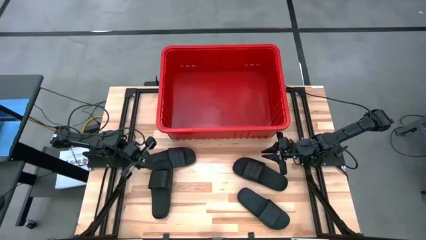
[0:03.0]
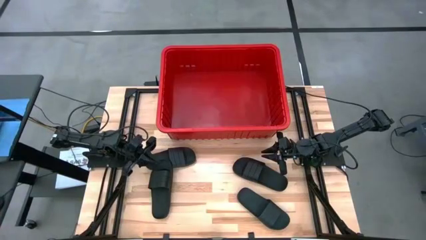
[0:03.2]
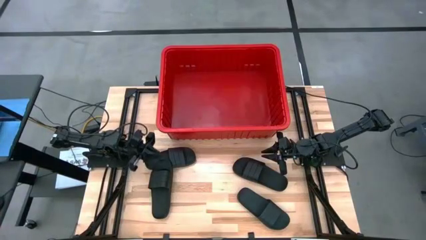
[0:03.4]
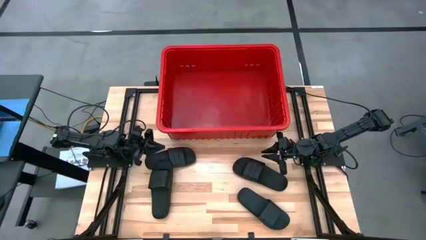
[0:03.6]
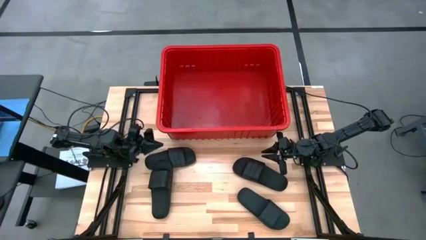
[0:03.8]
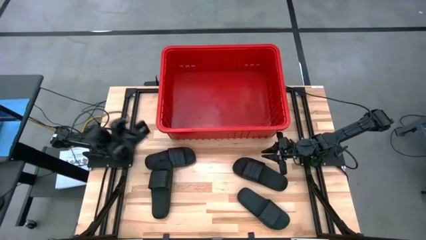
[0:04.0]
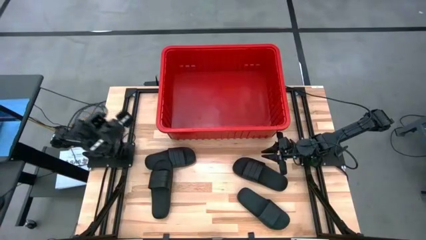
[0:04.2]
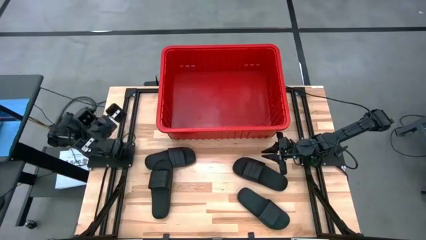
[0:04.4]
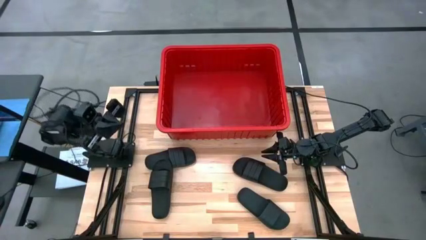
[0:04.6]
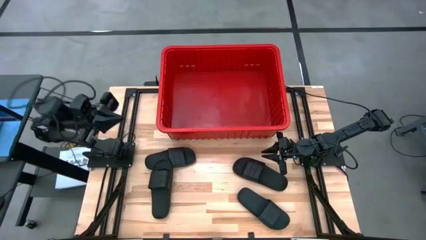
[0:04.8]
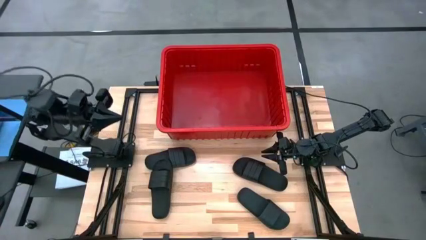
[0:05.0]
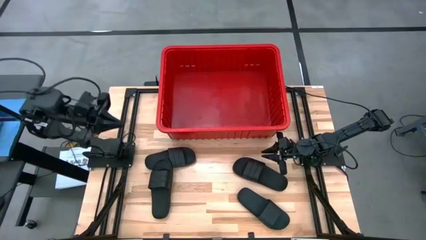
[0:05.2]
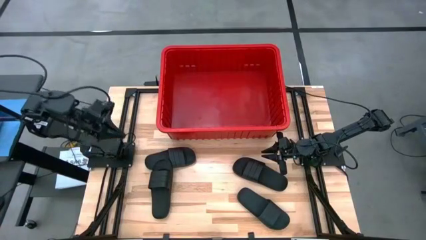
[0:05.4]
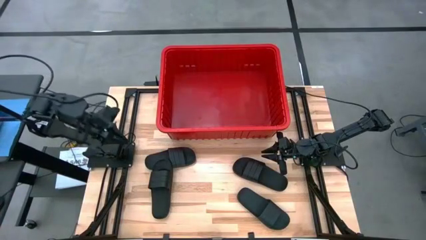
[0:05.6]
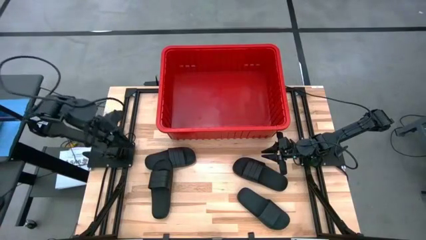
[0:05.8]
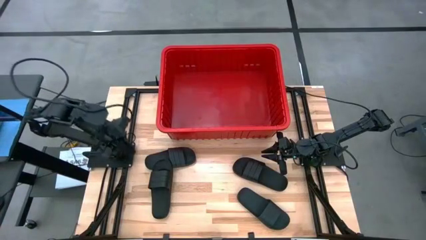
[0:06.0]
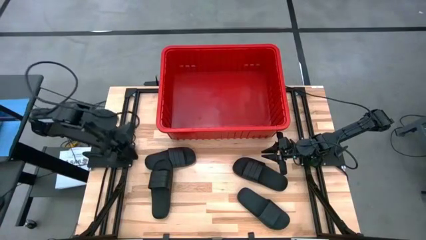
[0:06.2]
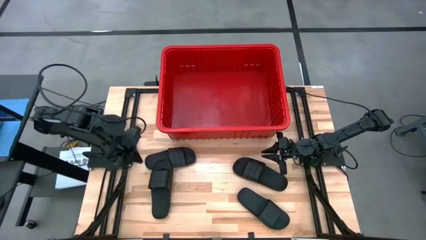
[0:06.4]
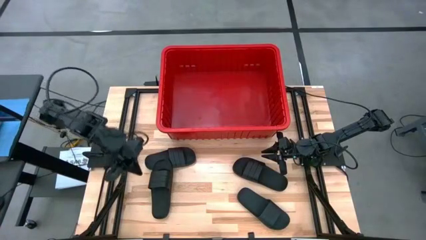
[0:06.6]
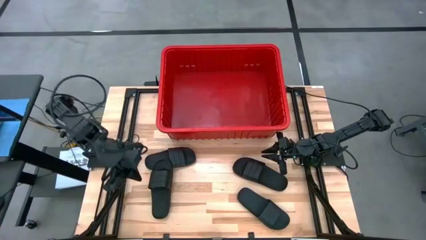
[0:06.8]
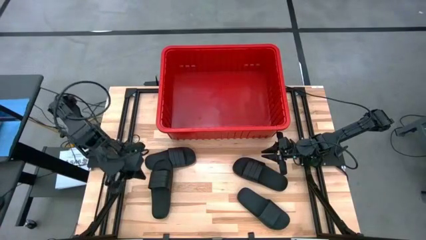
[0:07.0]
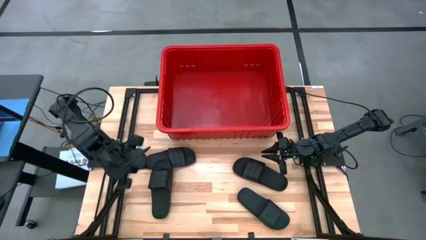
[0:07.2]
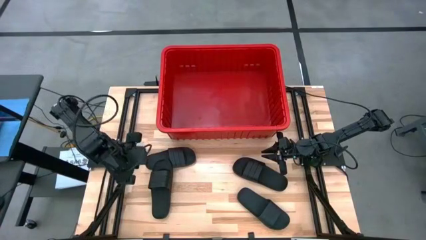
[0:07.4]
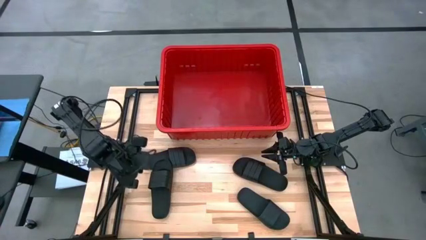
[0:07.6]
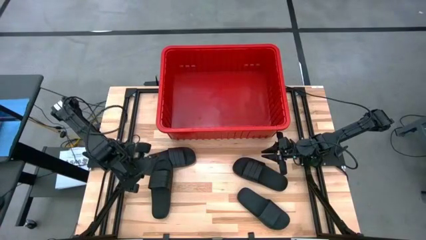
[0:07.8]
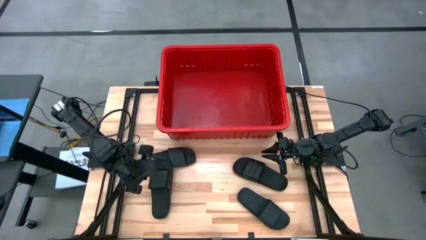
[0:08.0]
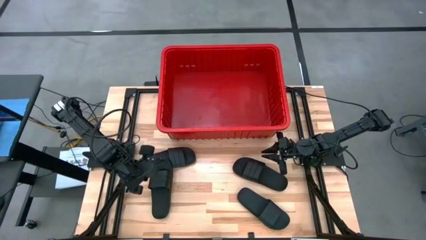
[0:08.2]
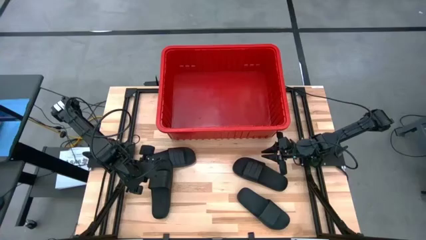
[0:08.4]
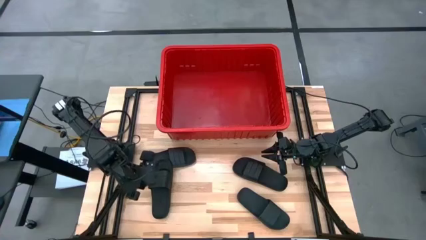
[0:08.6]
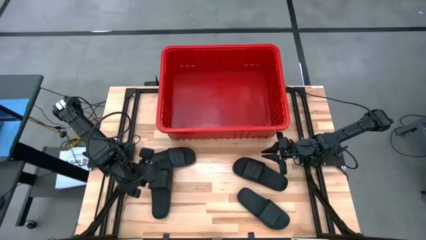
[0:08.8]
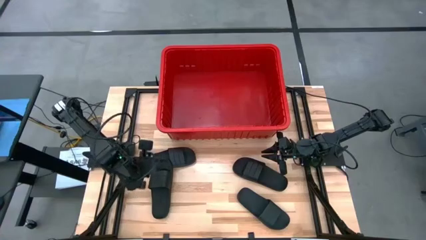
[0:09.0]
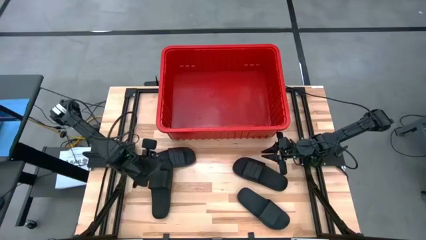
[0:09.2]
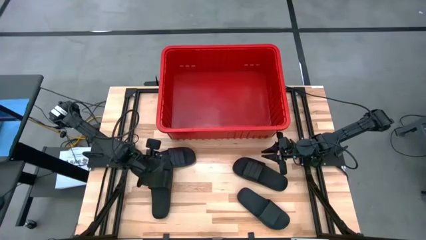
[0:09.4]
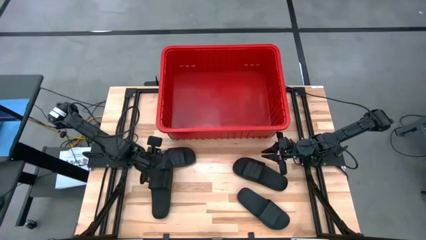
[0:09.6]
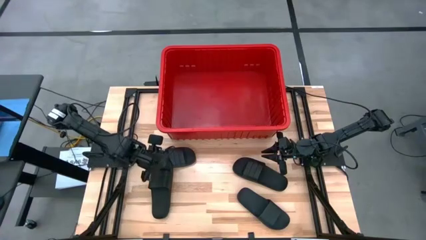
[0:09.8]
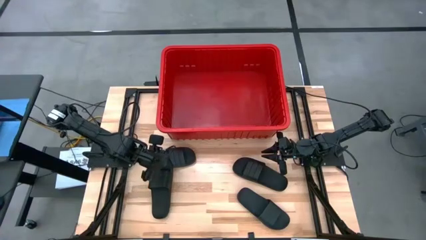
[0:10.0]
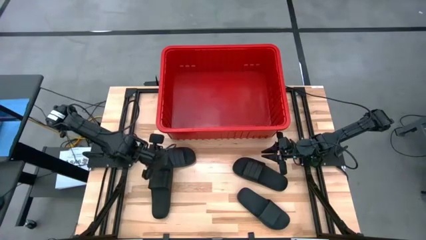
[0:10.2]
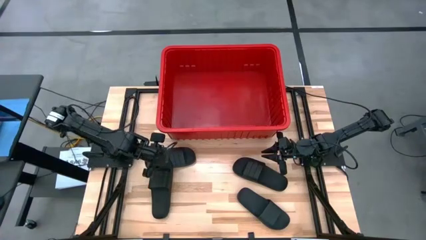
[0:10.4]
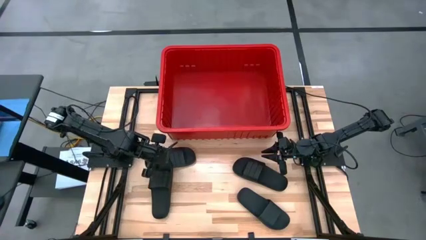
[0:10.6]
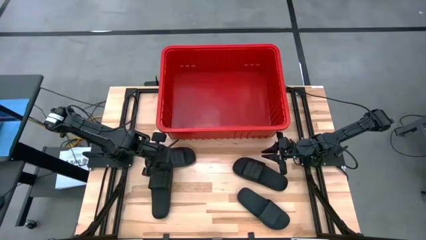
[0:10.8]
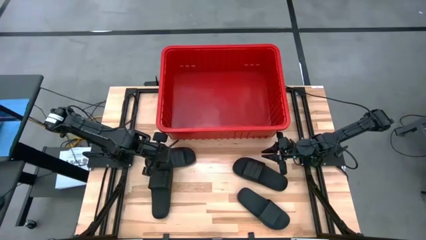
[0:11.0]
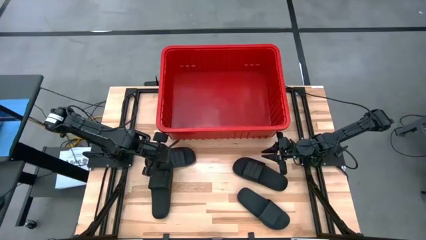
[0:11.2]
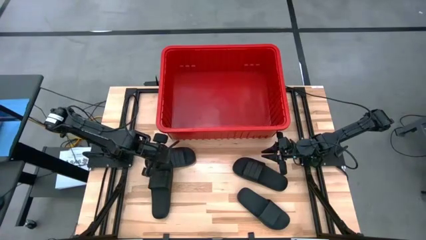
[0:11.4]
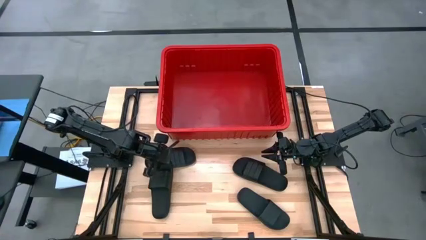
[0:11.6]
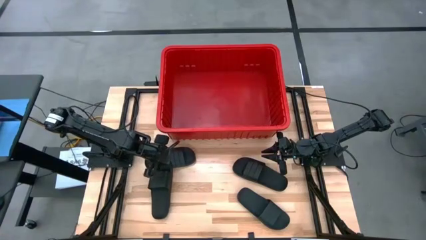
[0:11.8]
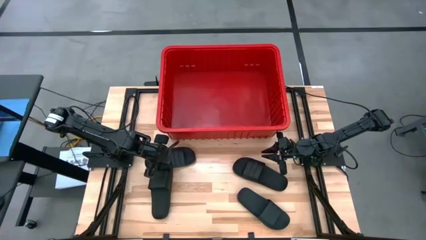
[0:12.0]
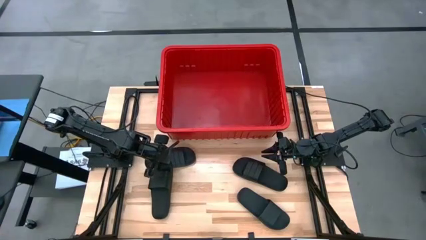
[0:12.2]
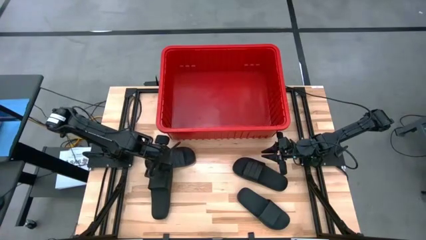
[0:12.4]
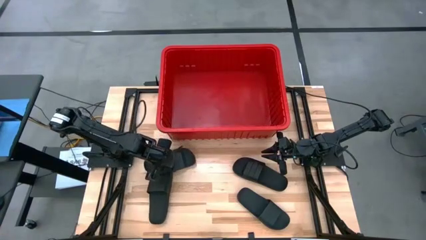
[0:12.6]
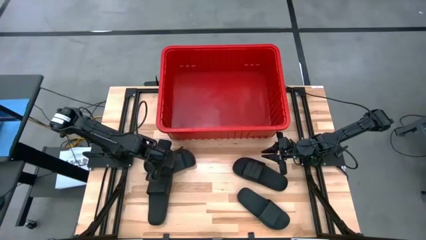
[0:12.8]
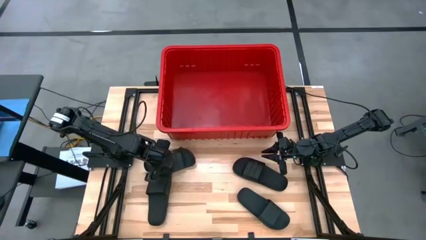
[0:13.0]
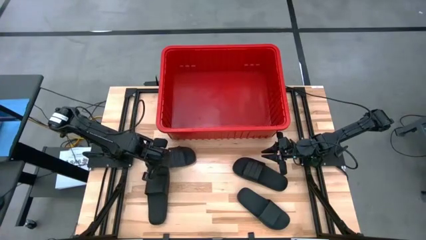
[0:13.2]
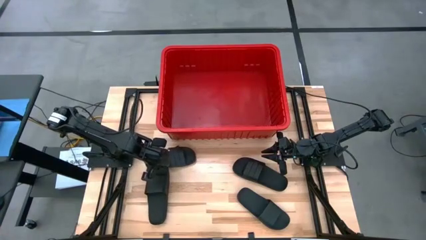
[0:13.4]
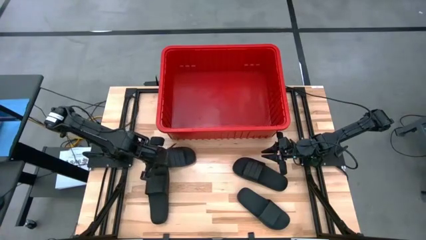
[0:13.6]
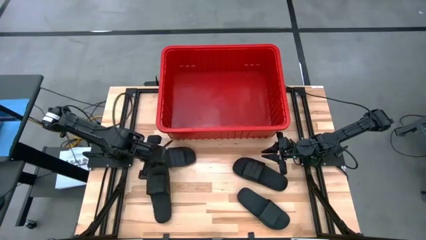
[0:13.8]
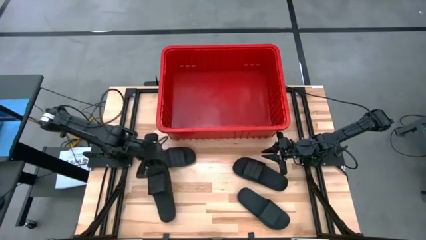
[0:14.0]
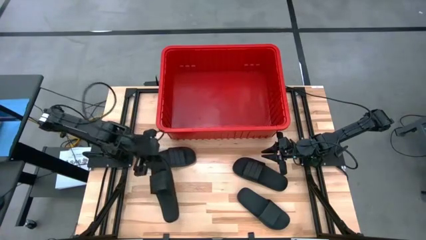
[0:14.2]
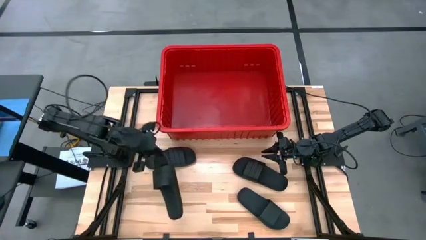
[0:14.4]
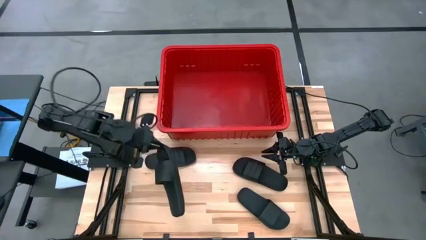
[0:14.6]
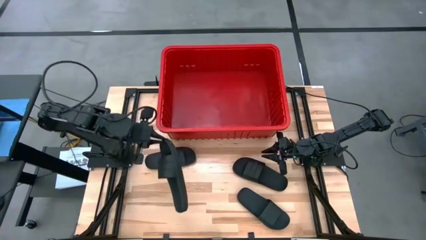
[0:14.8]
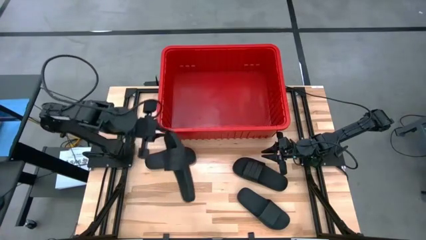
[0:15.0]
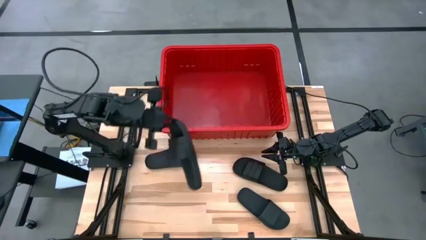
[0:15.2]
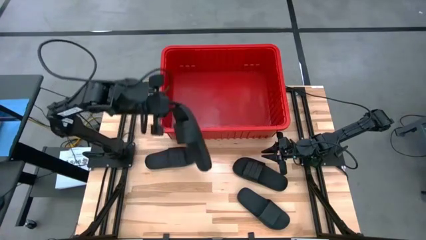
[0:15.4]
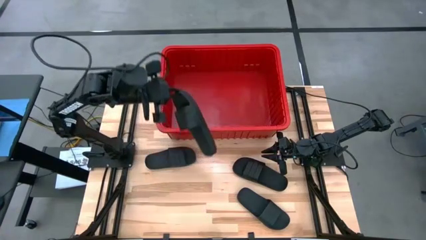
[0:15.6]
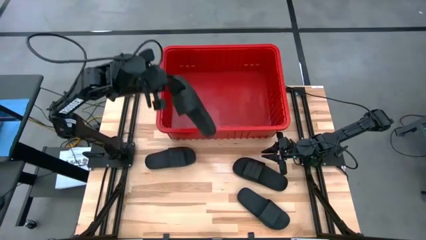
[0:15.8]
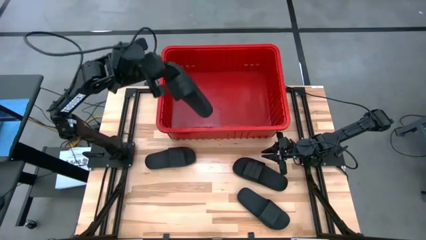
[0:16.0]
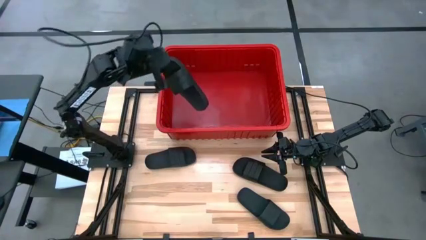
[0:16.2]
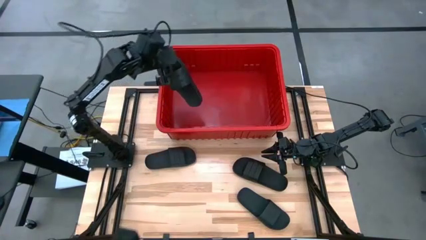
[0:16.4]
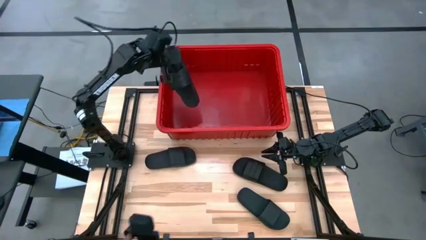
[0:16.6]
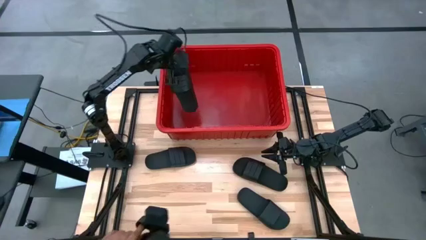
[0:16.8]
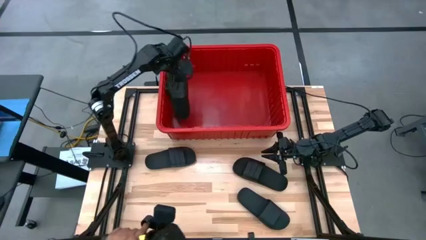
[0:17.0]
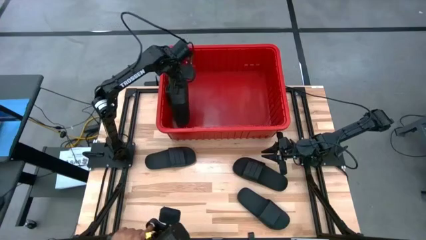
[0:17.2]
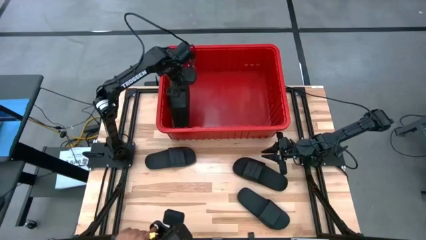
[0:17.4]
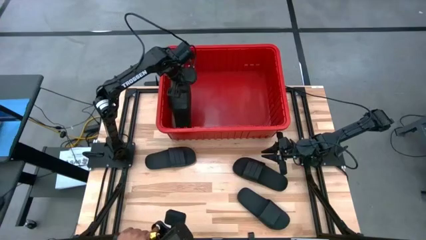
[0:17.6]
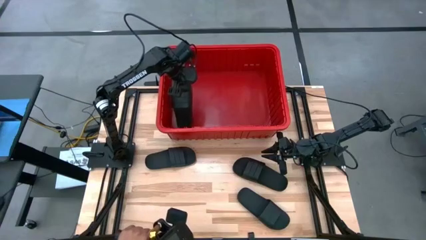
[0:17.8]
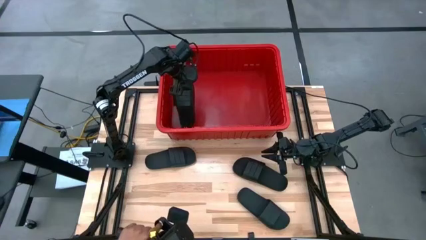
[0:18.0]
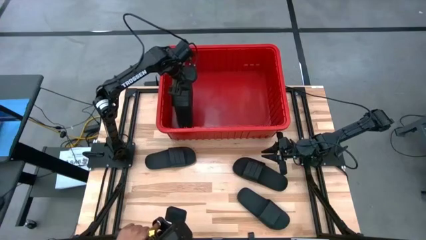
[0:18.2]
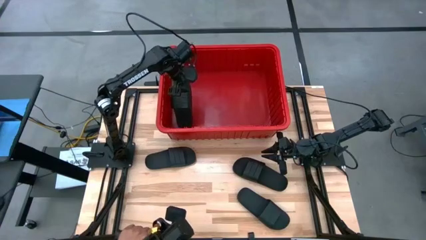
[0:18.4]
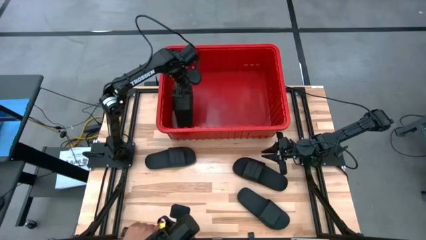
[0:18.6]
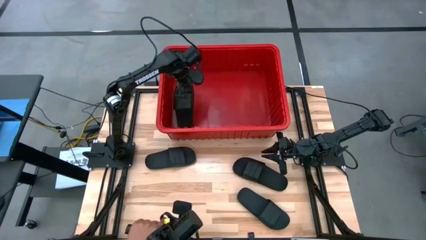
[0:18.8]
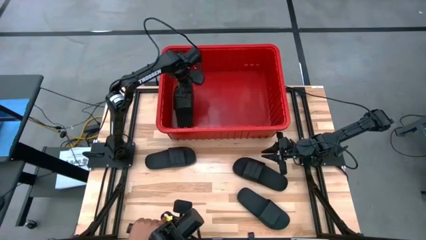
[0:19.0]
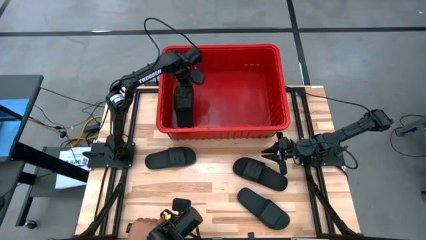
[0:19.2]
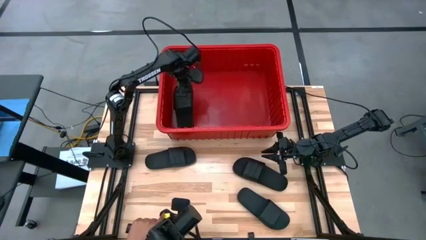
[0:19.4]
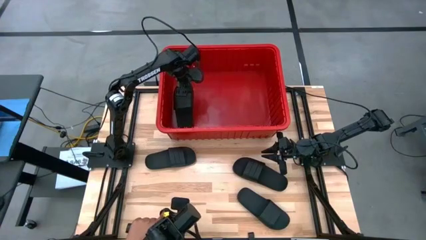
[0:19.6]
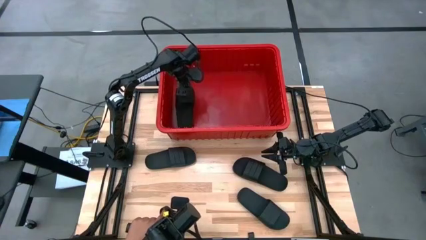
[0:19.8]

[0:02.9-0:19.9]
Task: Pick and place slides into bin
Put the black slide into the red bin
